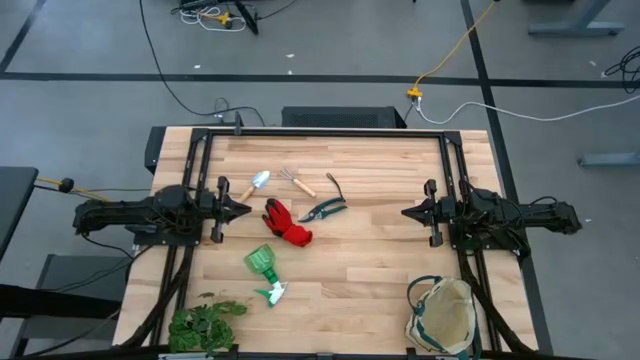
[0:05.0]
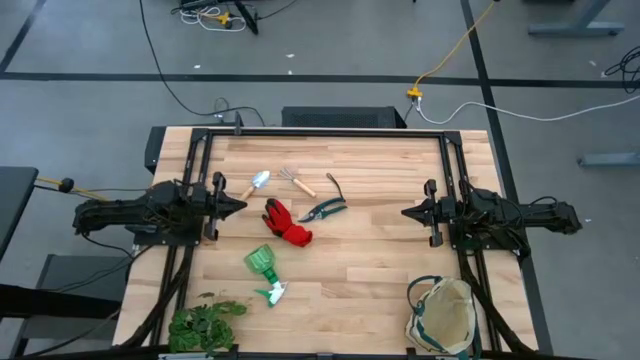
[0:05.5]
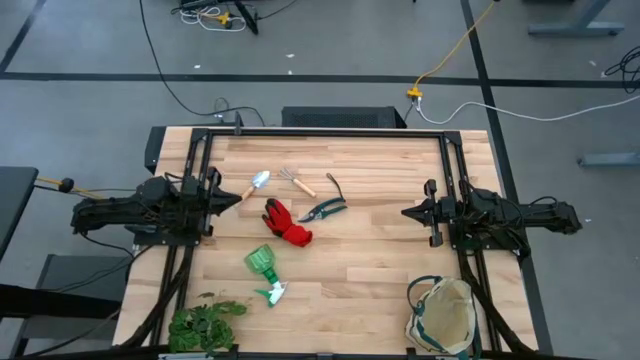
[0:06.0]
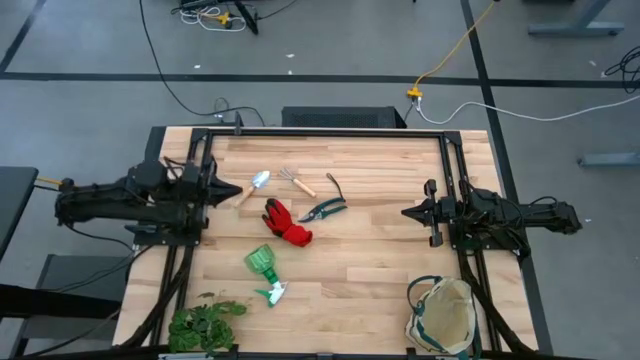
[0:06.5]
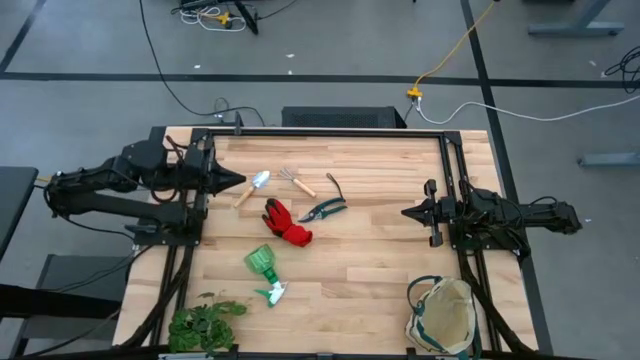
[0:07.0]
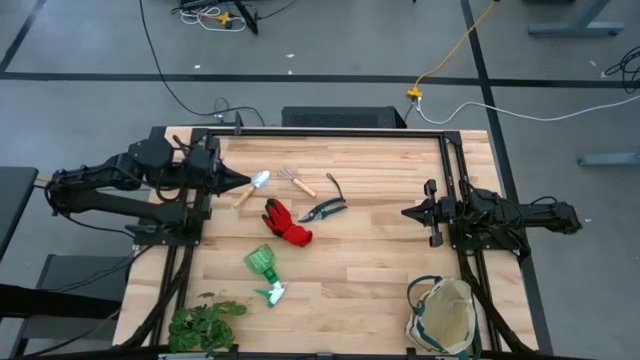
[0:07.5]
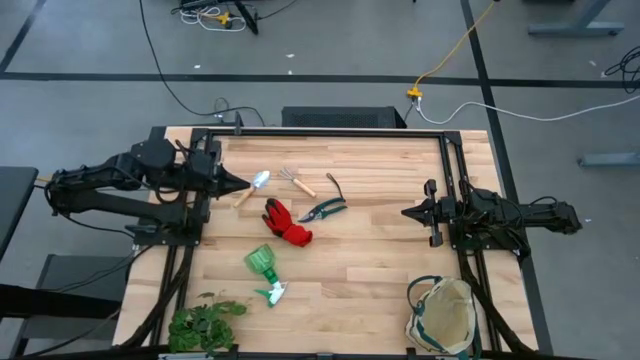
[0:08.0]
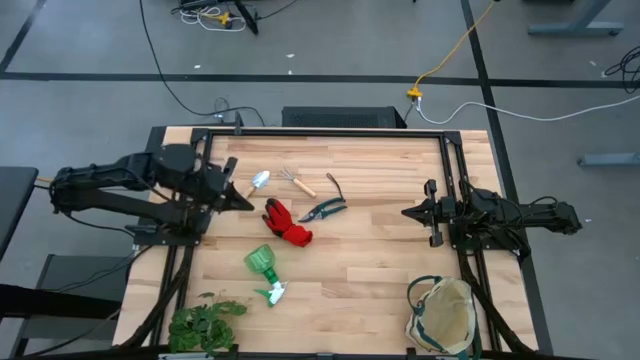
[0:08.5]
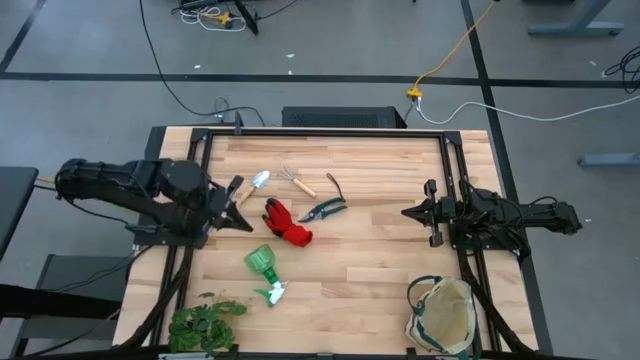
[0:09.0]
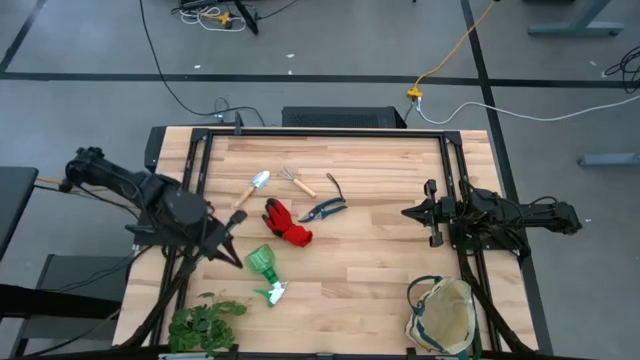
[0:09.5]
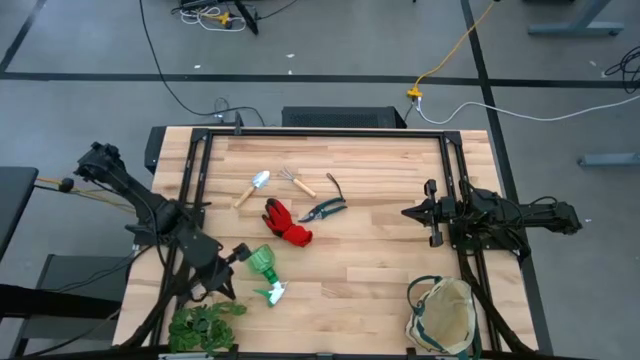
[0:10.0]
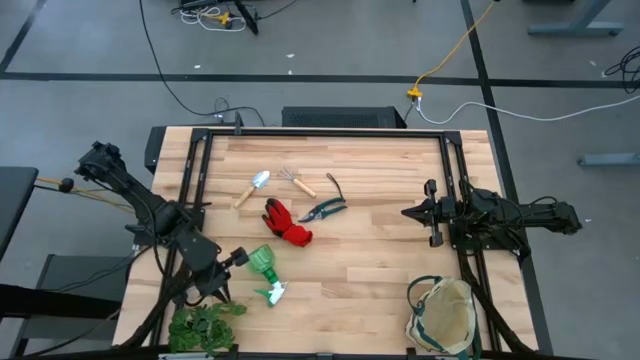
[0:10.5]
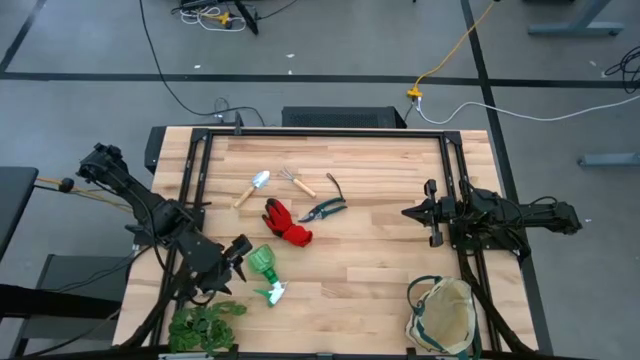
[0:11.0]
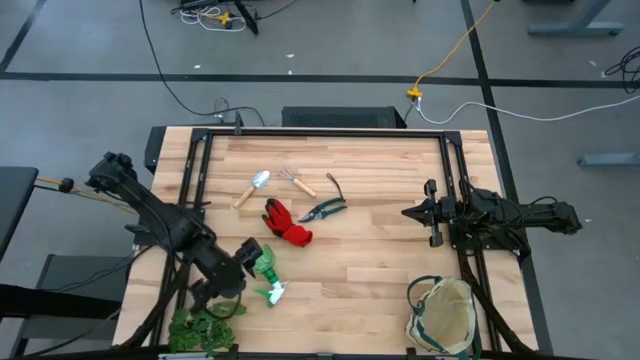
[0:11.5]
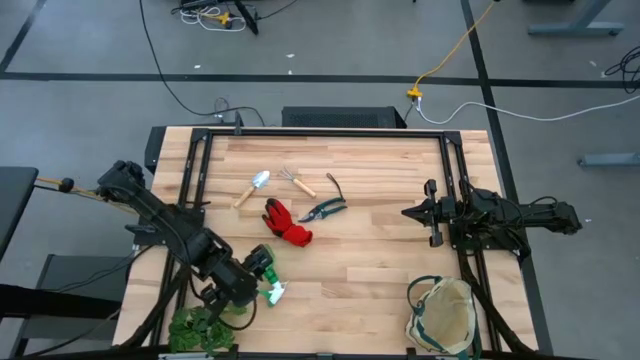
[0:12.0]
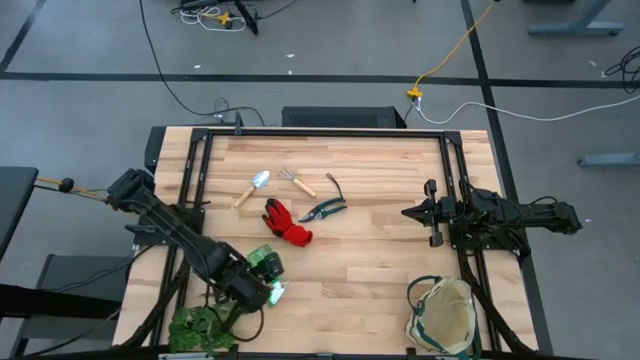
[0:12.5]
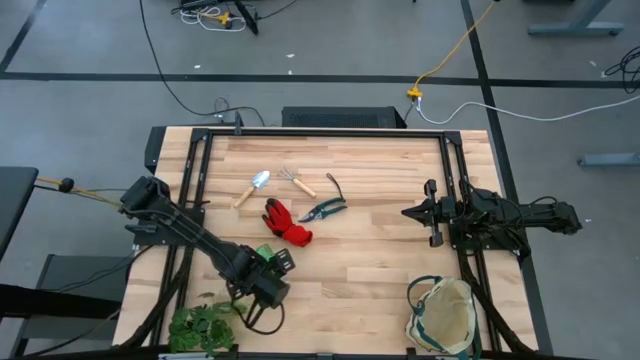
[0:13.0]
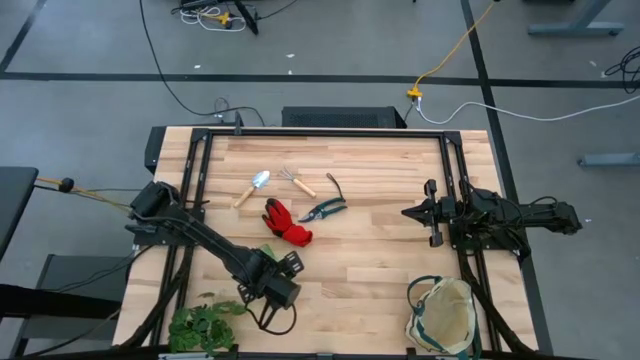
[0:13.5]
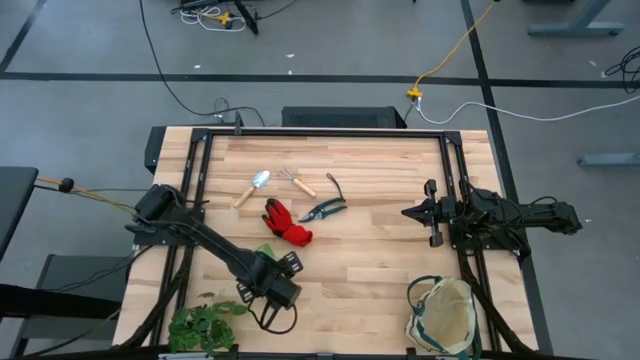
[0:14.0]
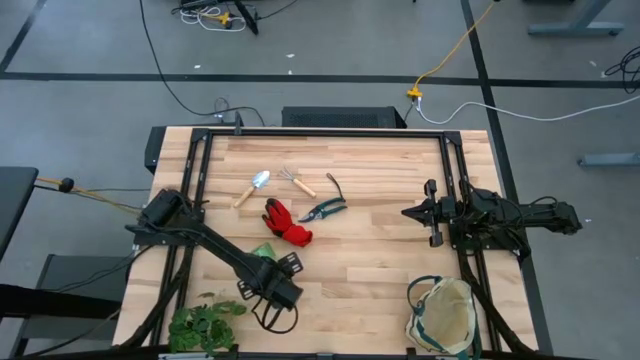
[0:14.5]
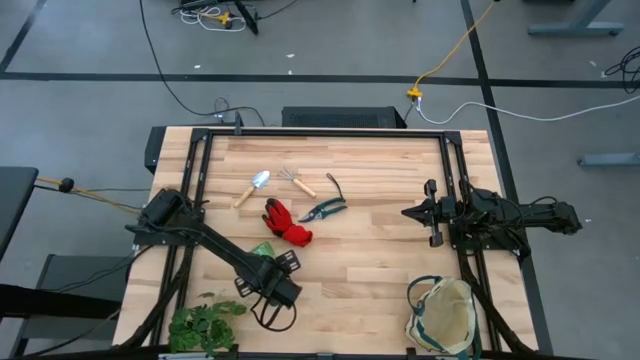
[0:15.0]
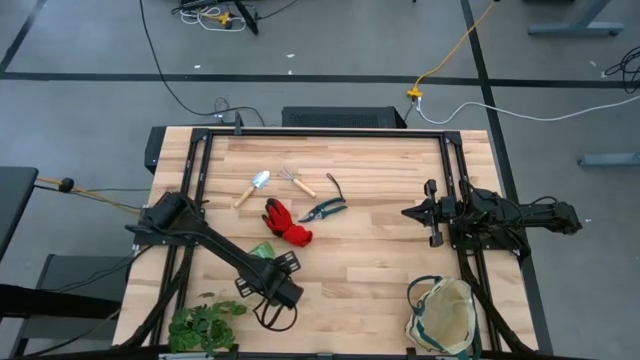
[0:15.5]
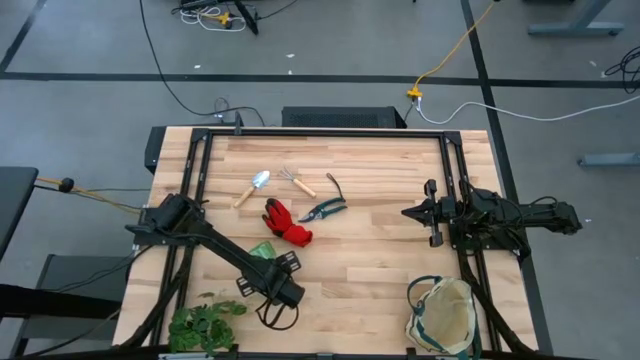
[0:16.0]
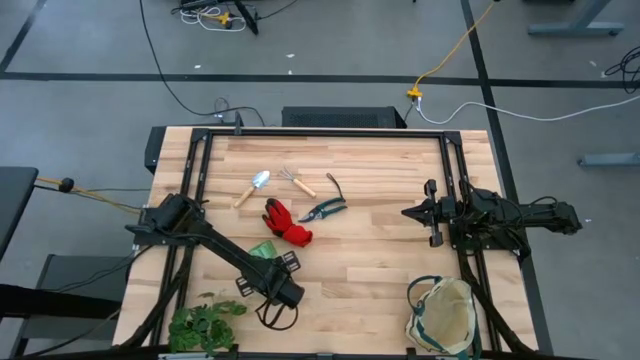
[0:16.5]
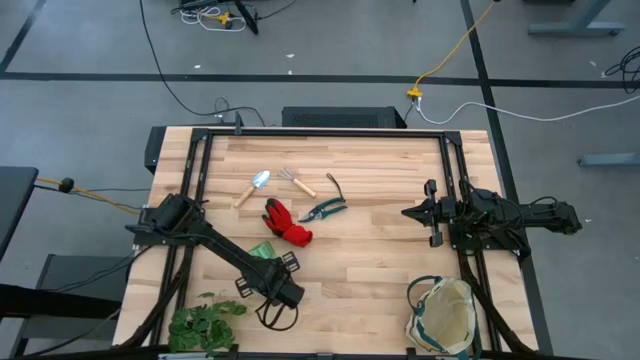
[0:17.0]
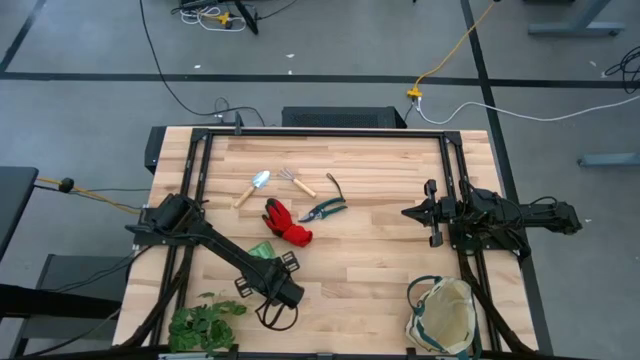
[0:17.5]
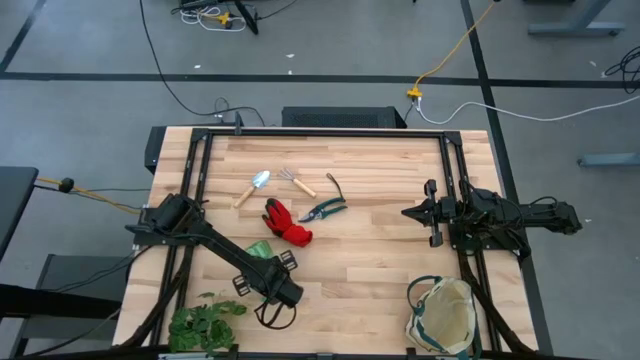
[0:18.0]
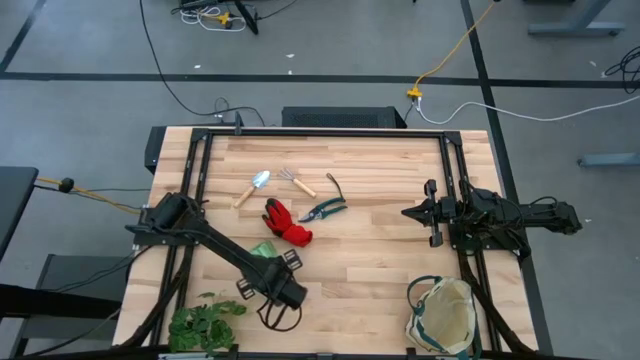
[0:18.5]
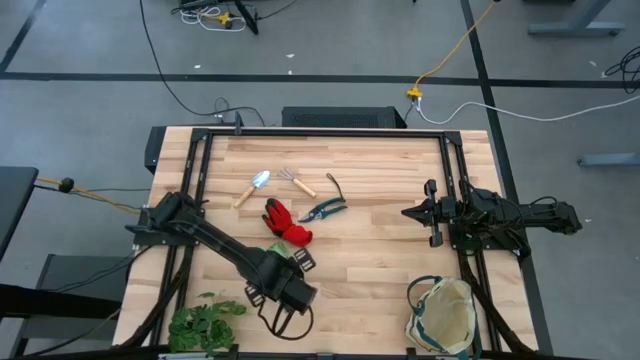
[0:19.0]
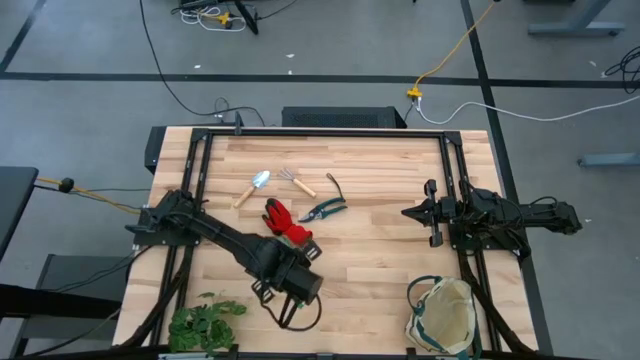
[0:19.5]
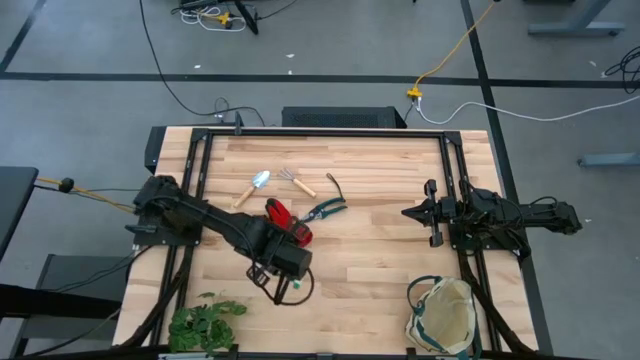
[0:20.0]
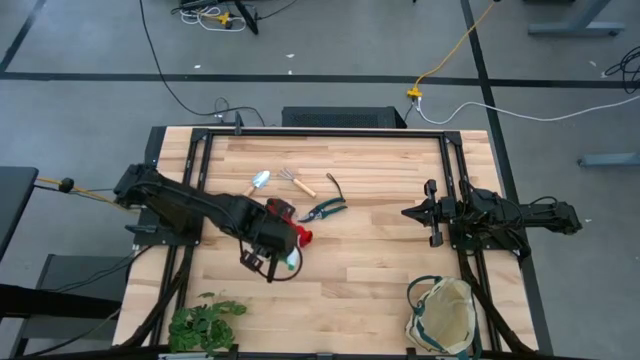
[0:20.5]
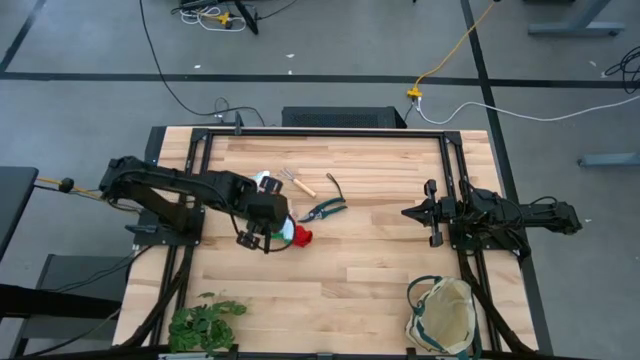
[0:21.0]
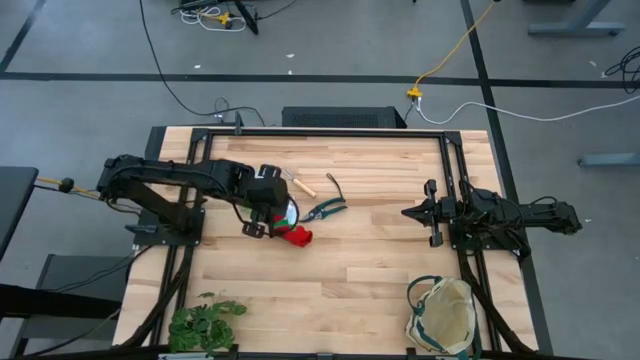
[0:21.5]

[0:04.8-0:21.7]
Task: Pick & Place Garden tools in Gardening bag
Put the green spray into the gardening bag

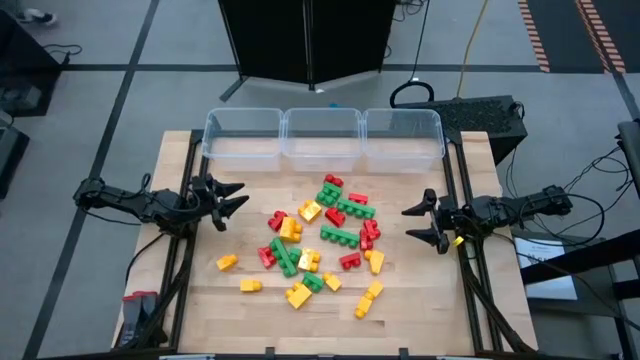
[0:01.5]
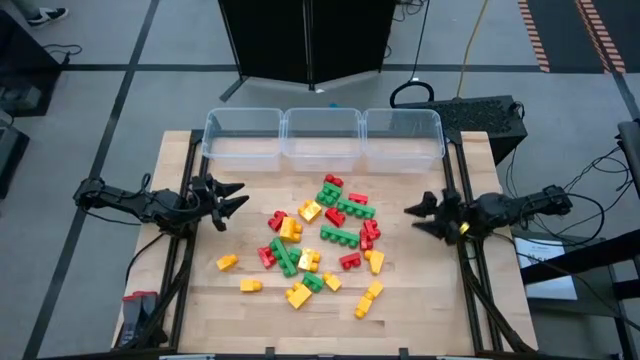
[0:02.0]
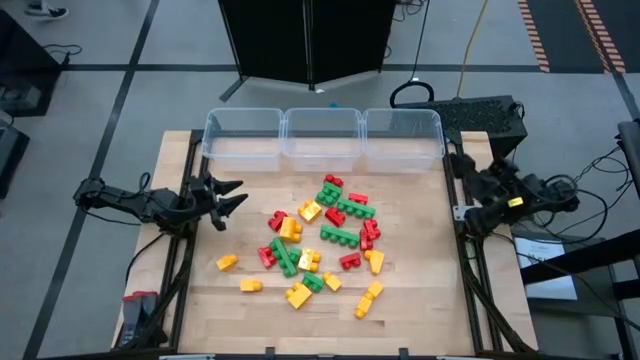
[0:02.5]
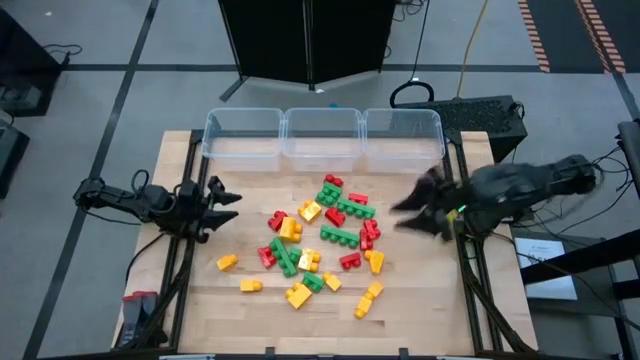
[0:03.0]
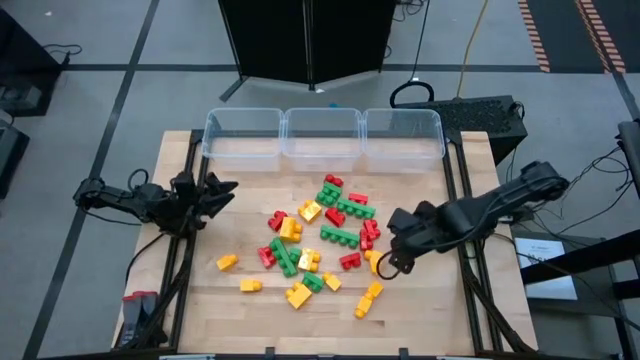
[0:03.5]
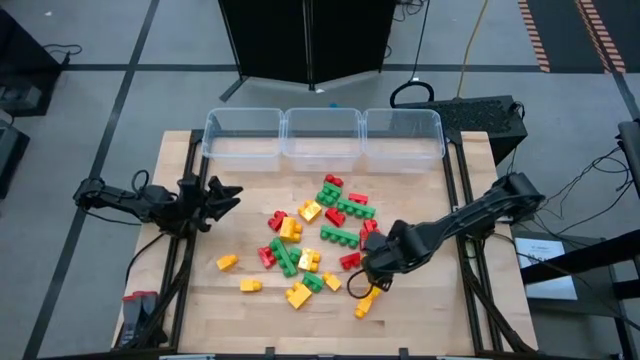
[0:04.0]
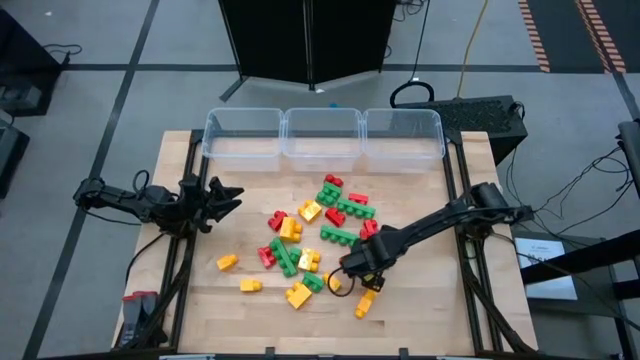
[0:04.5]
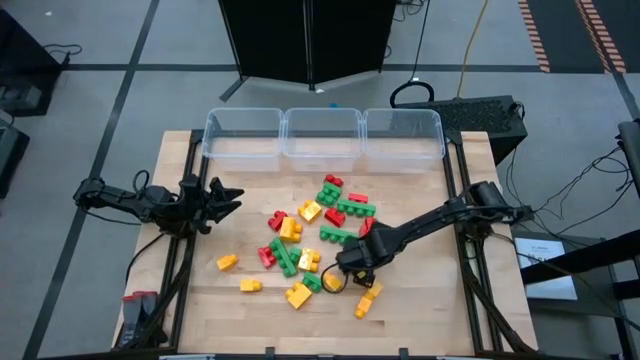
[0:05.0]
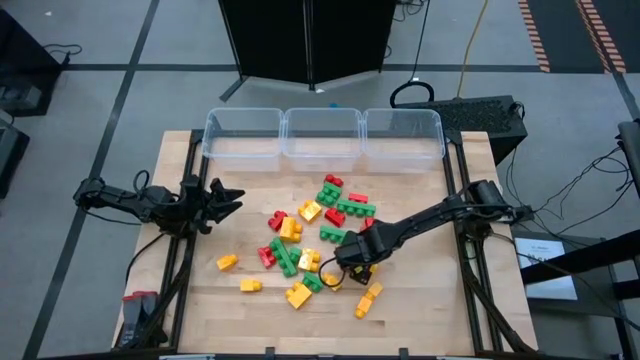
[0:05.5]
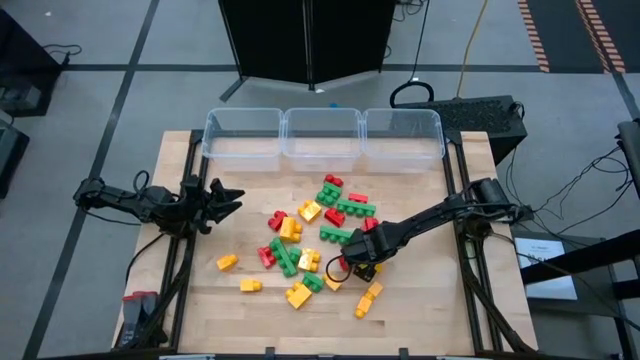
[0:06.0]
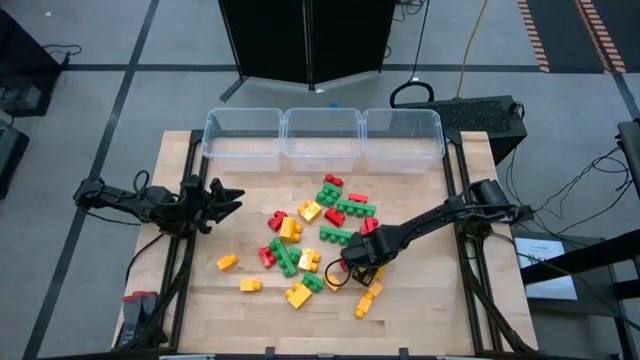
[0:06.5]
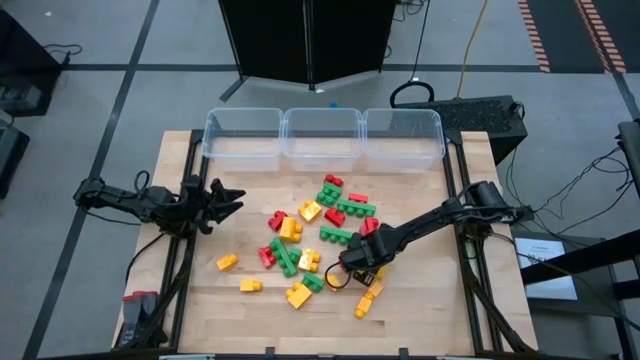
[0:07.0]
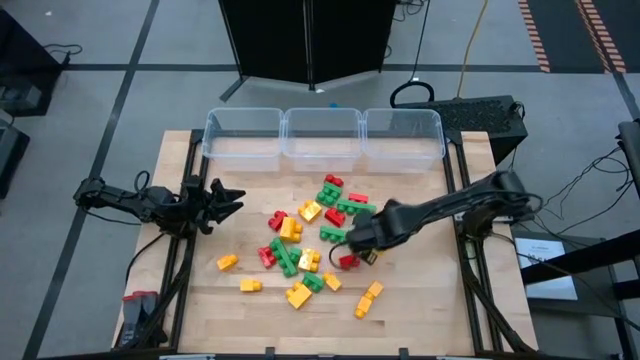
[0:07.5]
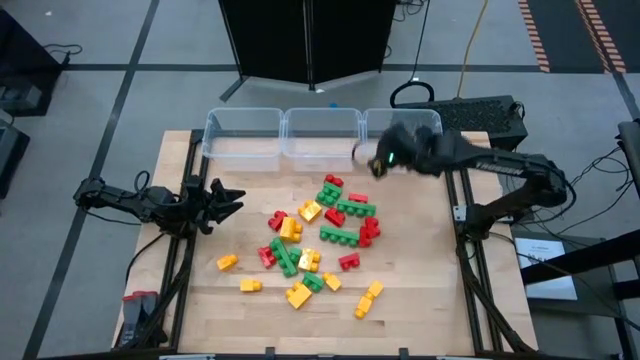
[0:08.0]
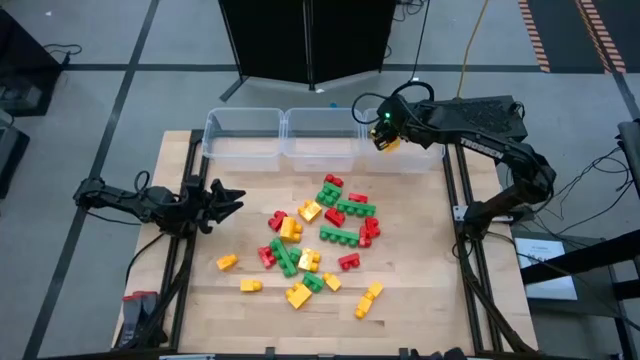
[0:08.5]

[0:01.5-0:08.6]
Task: Sort blocks
Put the yellow game piece with 1 stud into the right transparent bin
